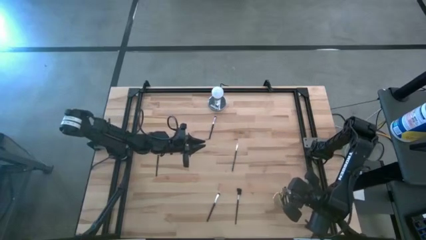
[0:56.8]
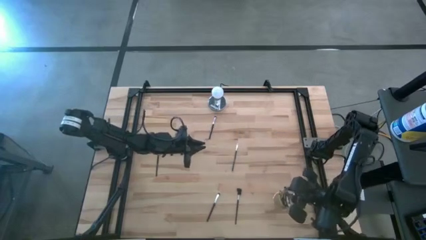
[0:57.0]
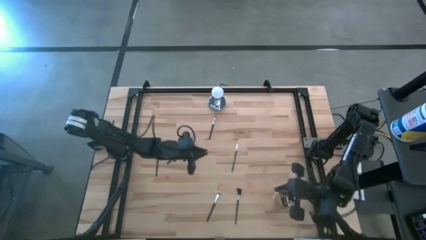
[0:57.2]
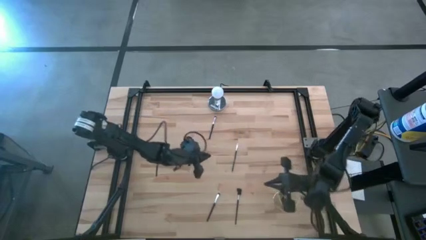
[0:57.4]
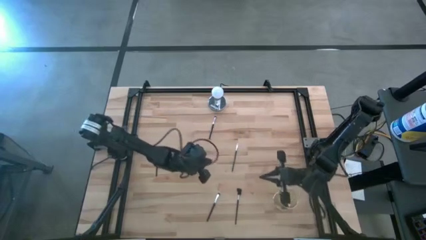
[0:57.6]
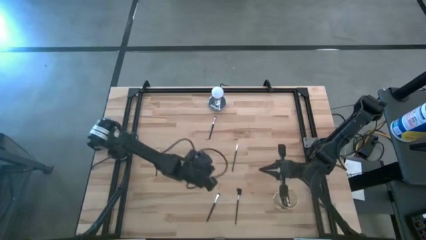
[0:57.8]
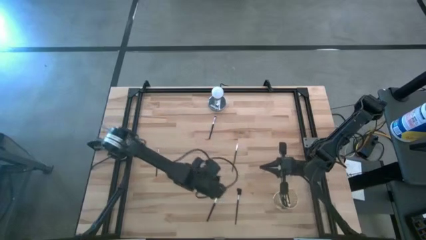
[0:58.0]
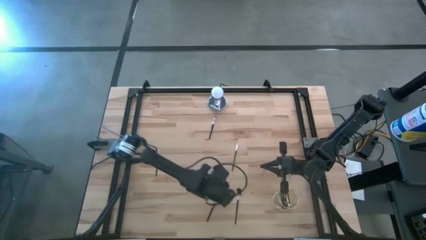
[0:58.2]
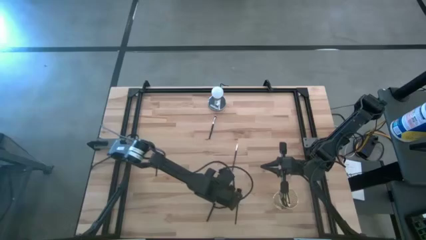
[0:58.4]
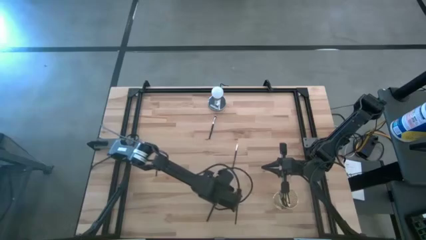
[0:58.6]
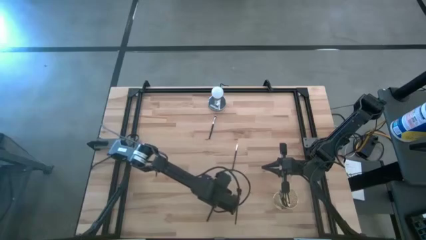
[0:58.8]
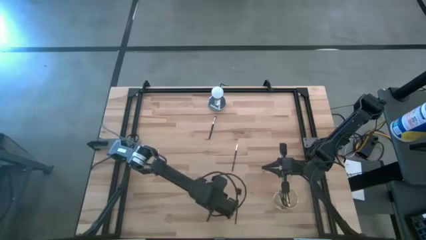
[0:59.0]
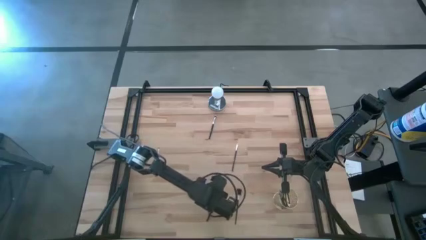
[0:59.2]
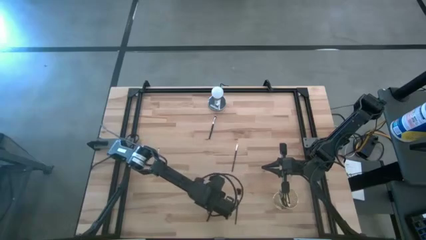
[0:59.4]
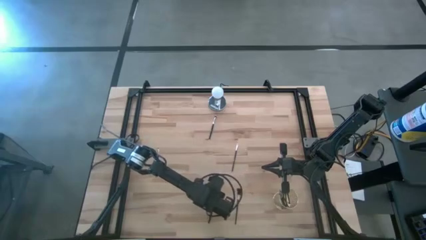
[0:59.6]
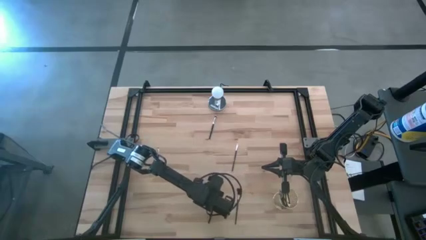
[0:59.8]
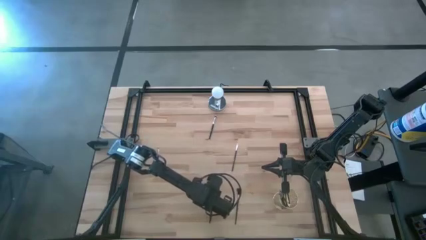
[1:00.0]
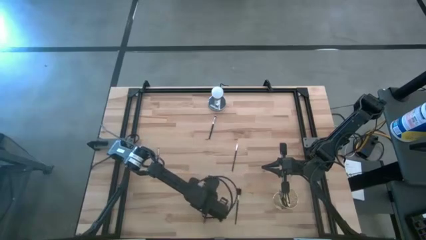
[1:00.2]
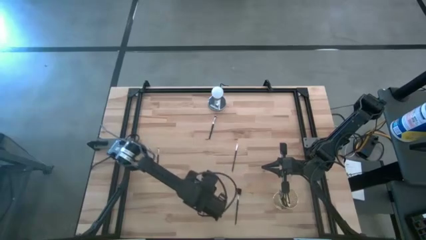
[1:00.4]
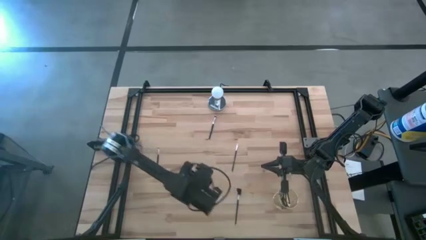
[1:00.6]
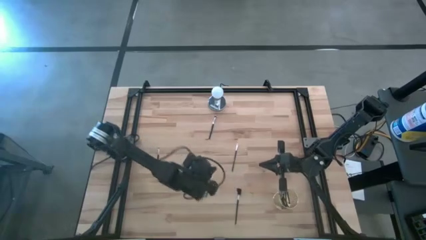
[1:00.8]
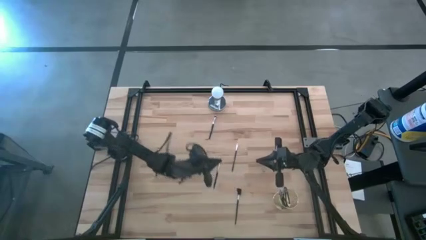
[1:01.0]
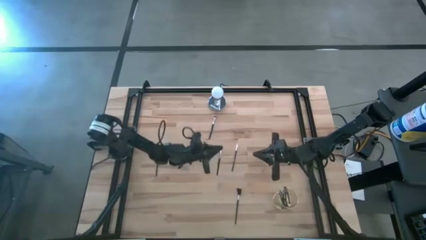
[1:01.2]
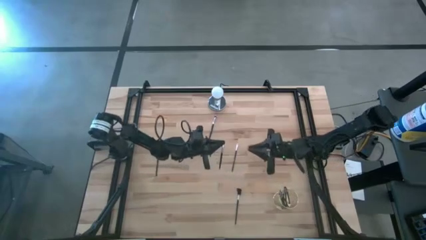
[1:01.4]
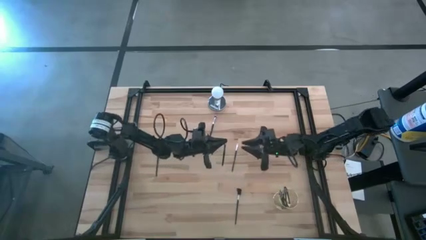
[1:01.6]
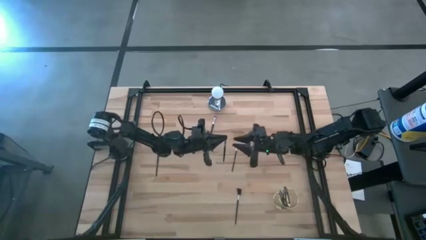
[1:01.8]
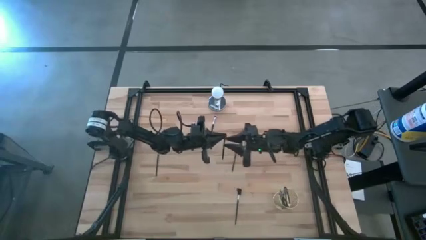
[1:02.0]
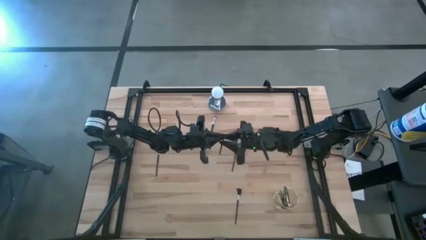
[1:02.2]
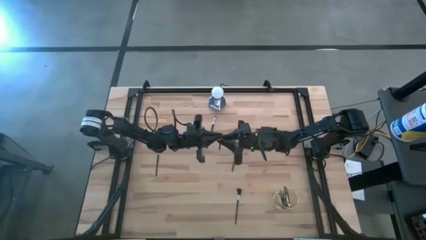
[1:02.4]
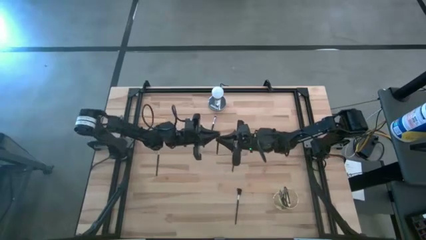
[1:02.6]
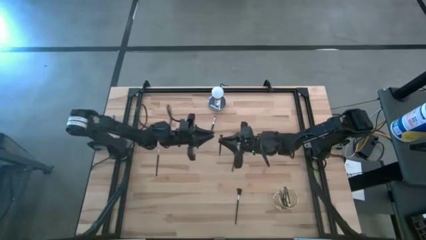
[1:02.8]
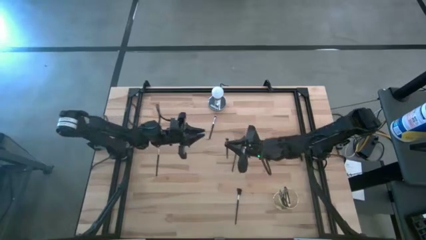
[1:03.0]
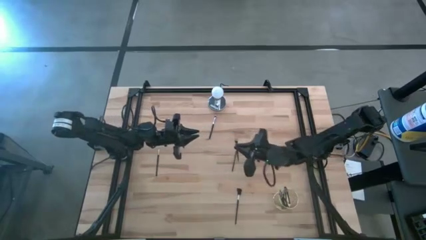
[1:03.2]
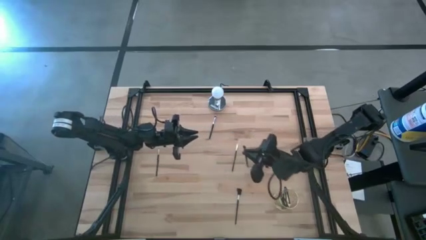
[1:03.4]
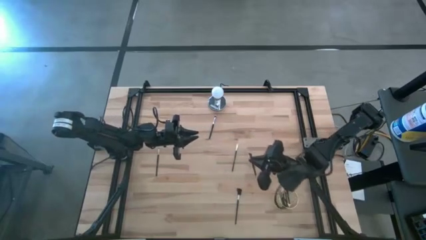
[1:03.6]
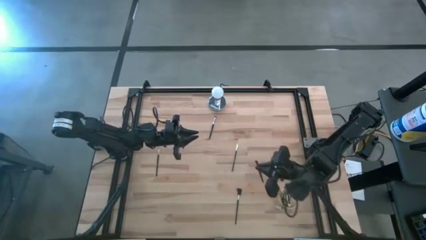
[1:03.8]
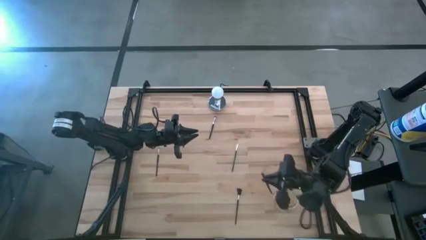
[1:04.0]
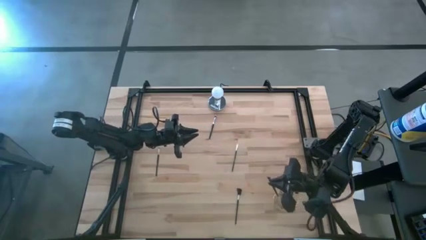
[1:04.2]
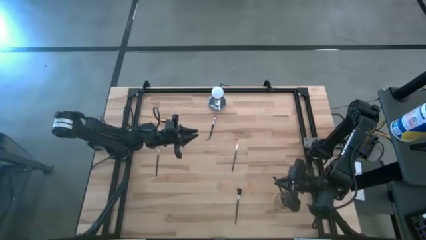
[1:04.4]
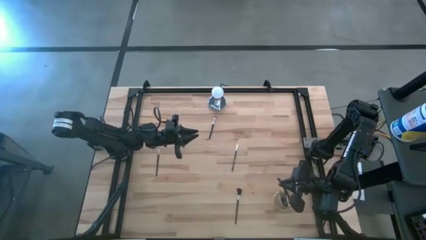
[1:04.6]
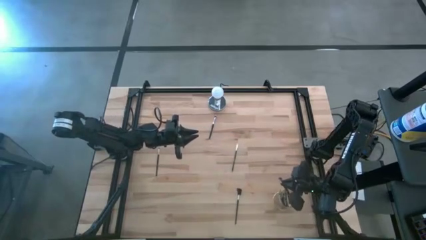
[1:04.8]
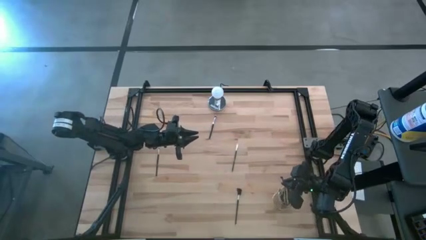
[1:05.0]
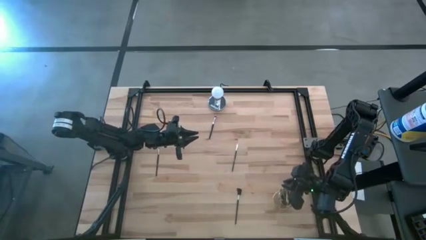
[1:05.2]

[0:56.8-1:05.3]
Task: Pick & Place Makeup Supplies
Put the silver makeup brush into the gold makeup holder

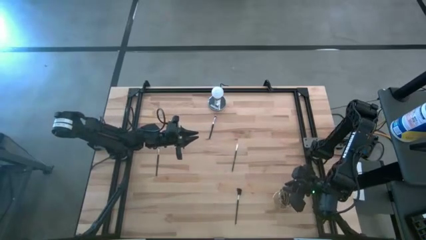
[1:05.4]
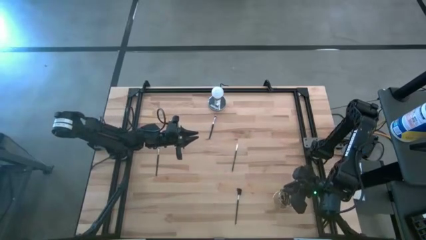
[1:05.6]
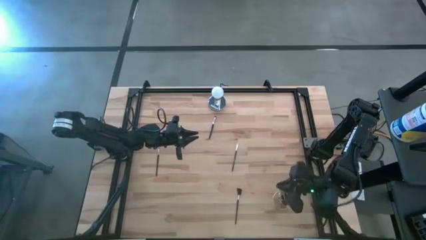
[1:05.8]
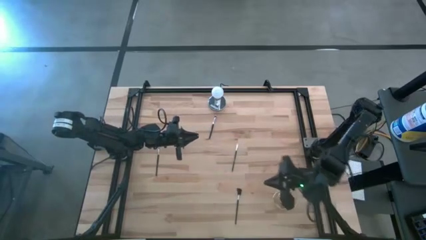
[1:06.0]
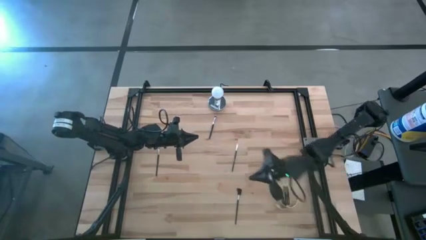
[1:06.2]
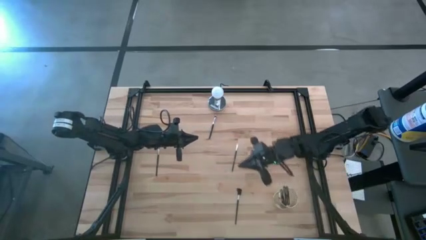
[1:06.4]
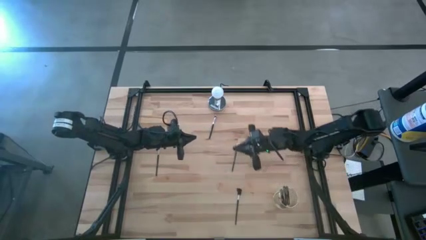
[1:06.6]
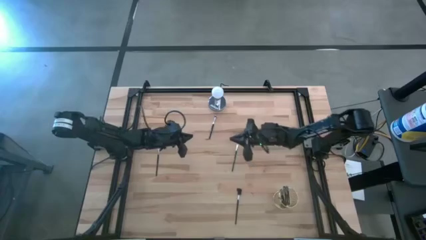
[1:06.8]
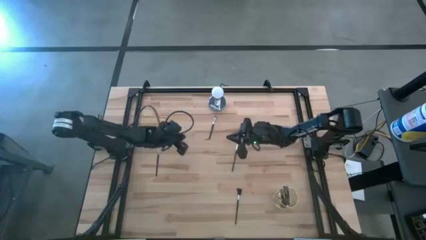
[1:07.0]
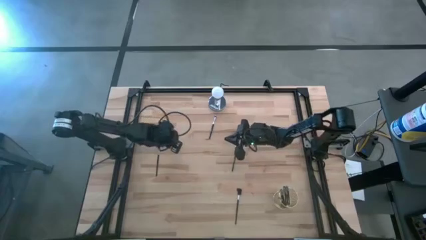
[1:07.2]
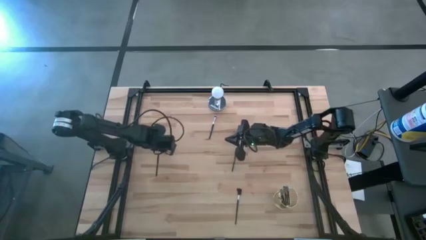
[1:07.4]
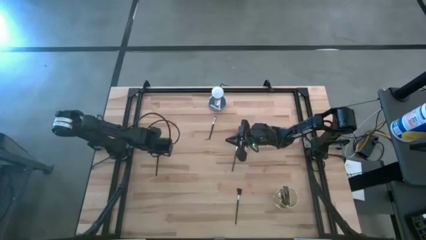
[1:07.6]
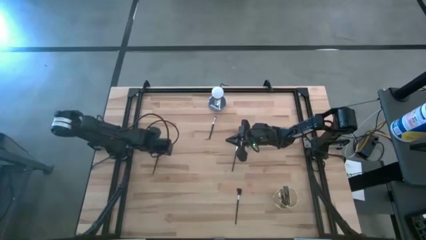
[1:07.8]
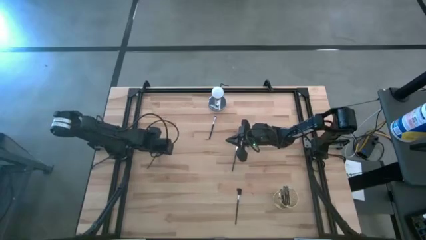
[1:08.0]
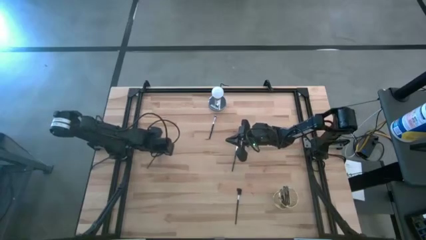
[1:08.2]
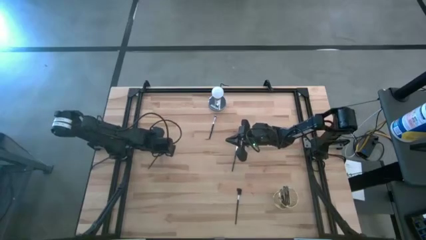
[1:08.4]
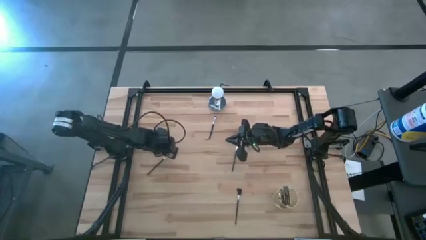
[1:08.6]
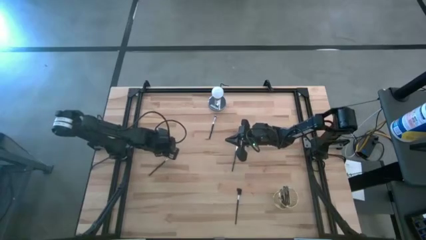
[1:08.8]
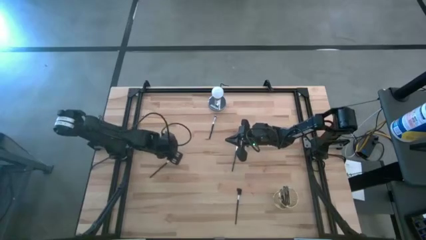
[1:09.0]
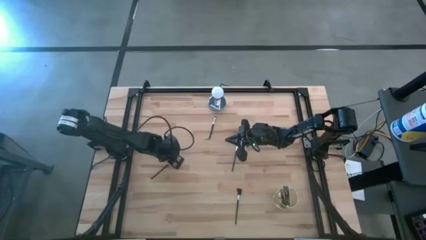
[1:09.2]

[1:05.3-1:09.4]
Put the silver makeup brush into the gold makeup holder

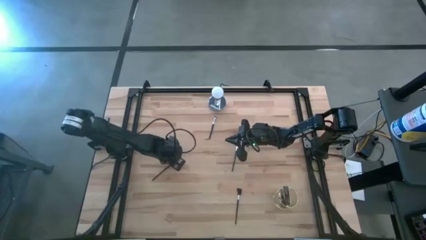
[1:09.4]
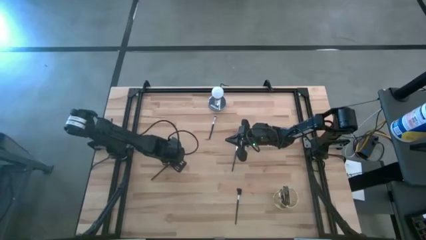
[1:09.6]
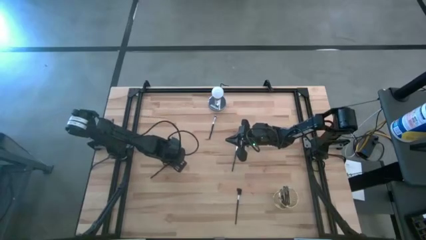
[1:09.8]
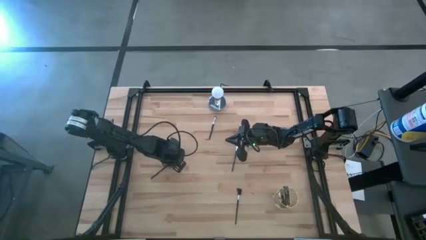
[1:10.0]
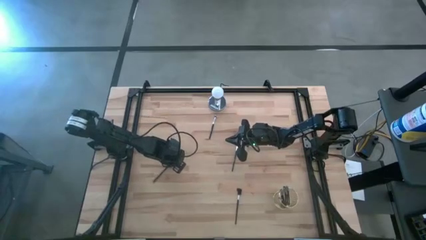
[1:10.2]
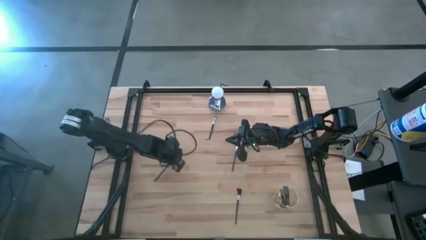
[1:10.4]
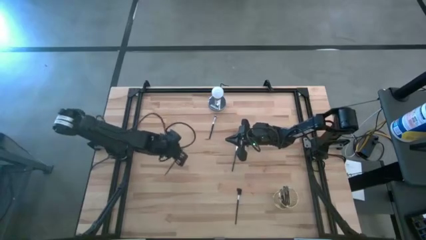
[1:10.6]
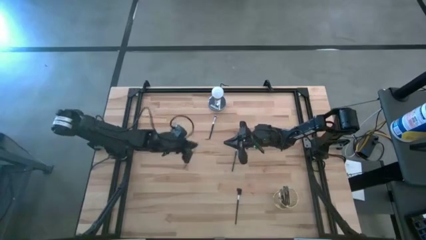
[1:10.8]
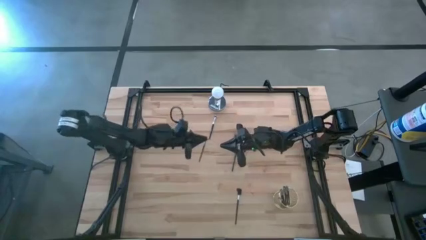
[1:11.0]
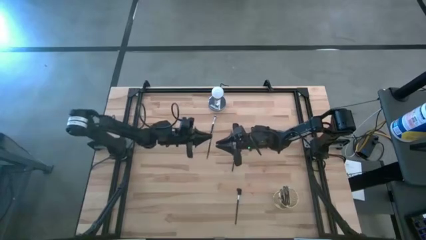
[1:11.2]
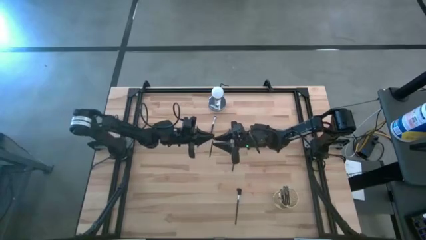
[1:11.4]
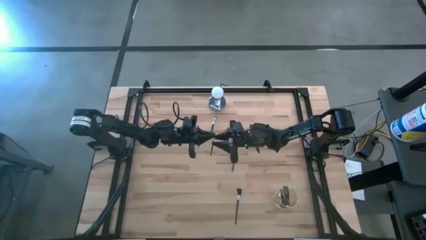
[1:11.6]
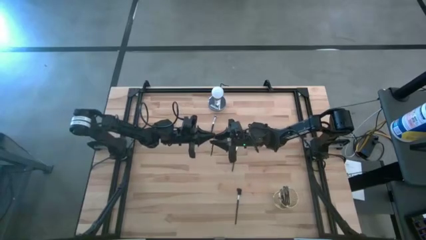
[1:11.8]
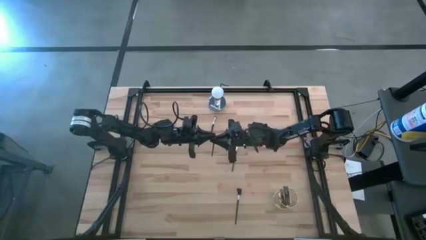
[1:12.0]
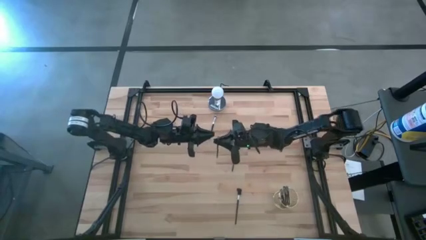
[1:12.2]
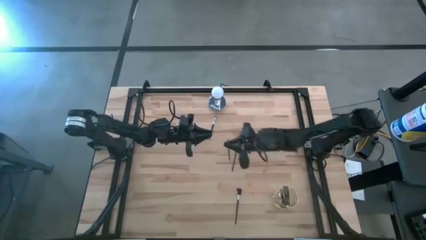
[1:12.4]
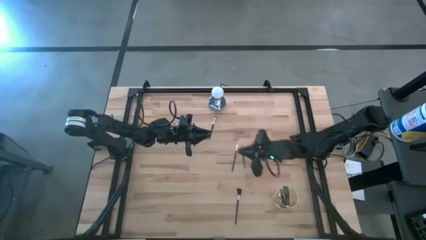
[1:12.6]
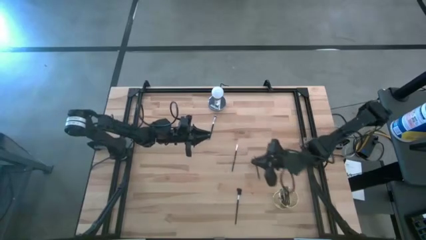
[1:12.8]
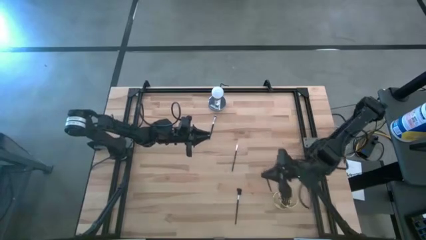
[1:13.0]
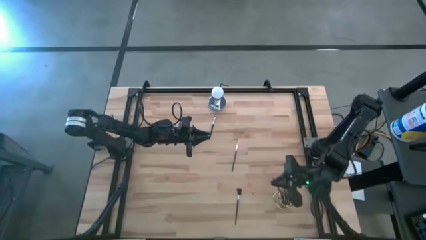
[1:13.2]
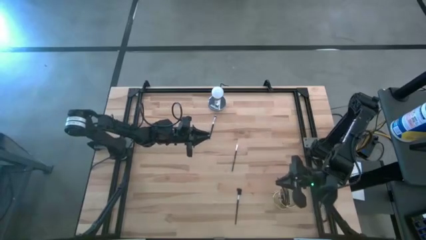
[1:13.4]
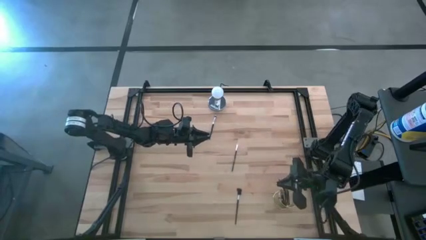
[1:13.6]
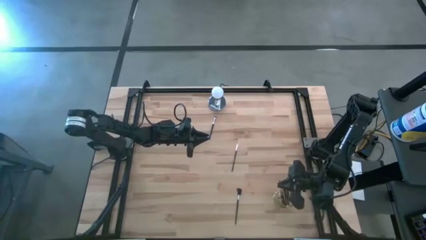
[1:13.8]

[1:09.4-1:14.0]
Put the silver makeup brush into the gold makeup holder
